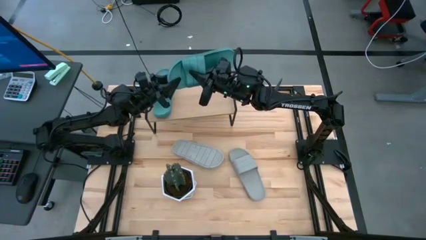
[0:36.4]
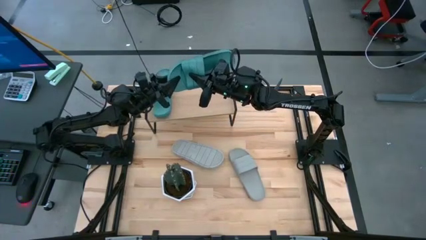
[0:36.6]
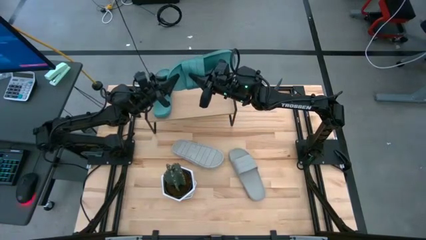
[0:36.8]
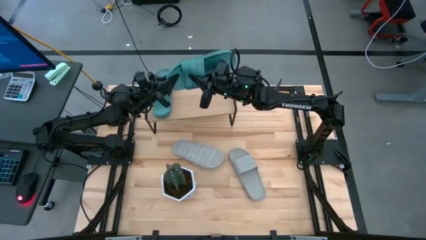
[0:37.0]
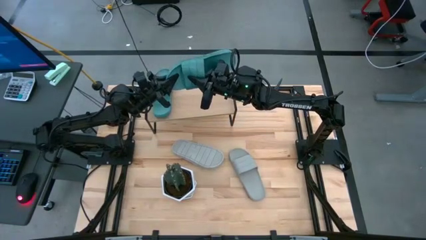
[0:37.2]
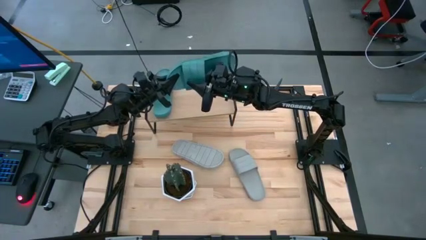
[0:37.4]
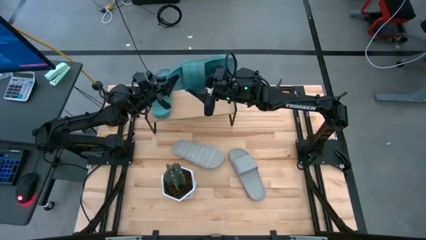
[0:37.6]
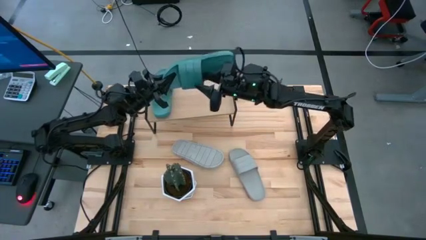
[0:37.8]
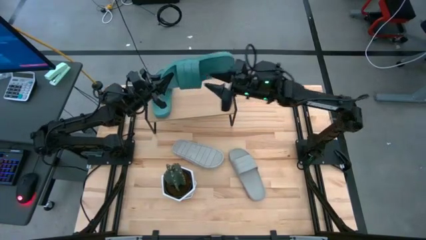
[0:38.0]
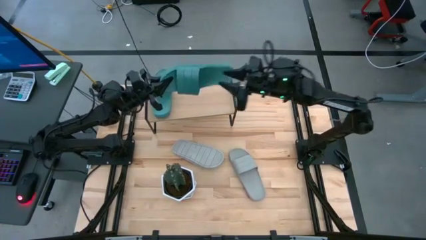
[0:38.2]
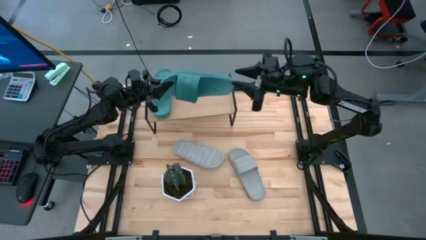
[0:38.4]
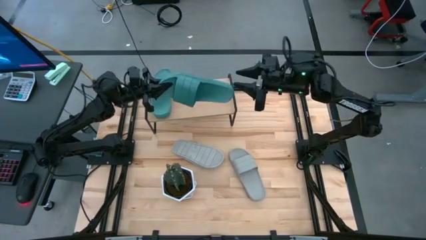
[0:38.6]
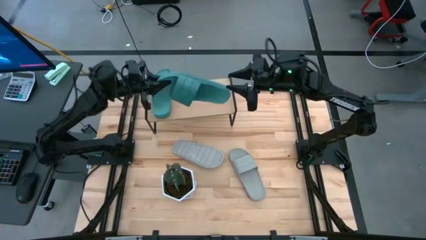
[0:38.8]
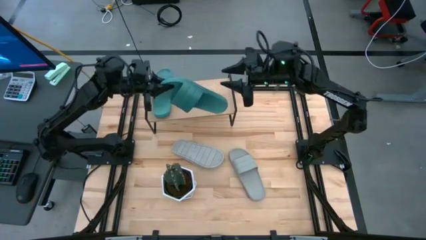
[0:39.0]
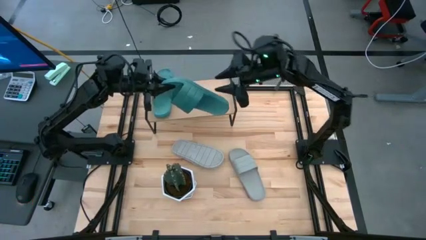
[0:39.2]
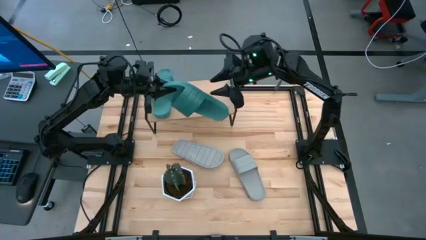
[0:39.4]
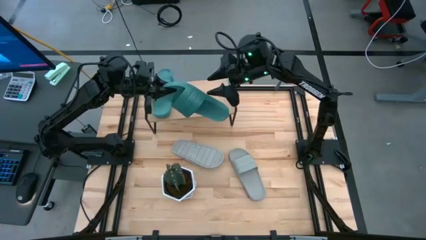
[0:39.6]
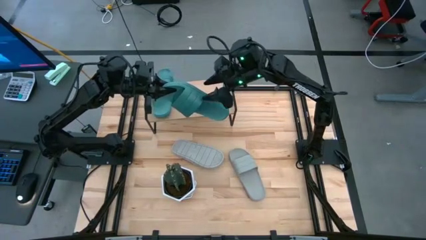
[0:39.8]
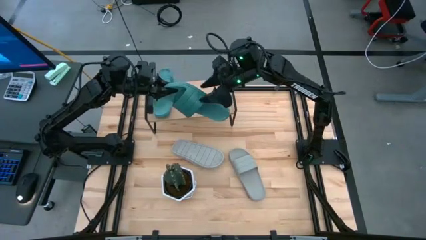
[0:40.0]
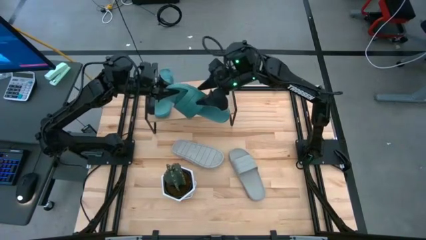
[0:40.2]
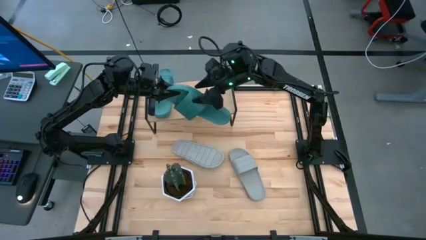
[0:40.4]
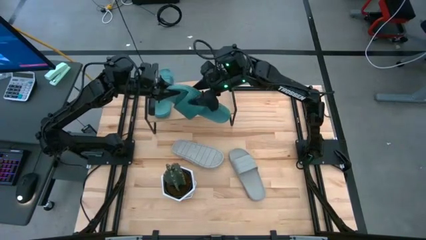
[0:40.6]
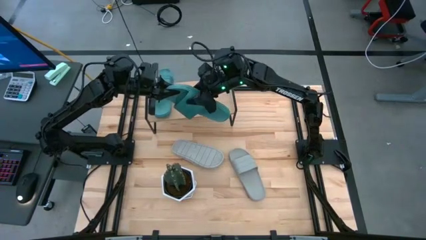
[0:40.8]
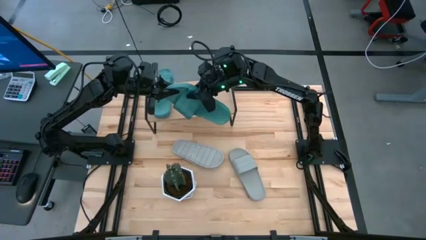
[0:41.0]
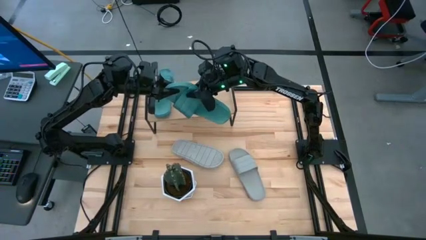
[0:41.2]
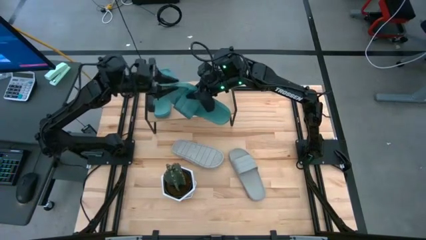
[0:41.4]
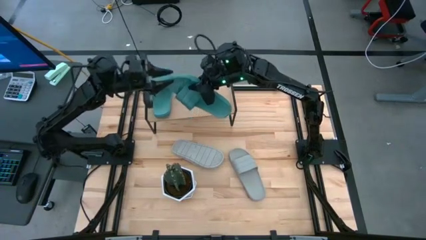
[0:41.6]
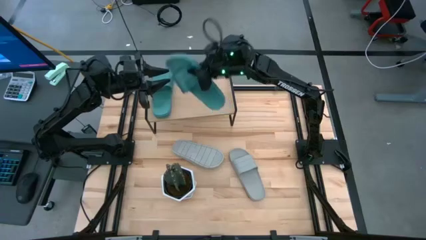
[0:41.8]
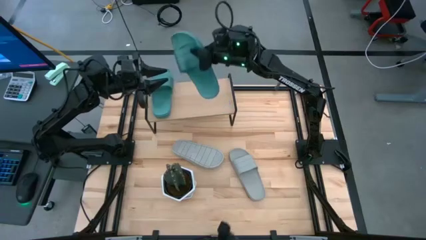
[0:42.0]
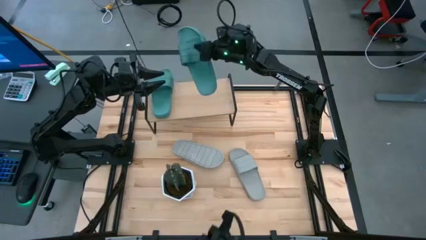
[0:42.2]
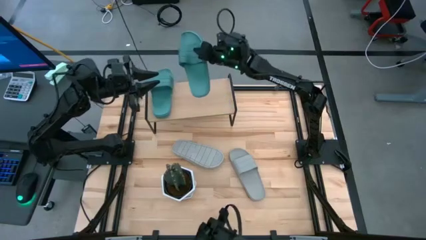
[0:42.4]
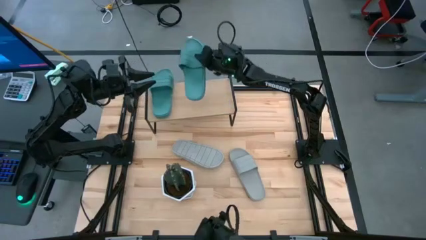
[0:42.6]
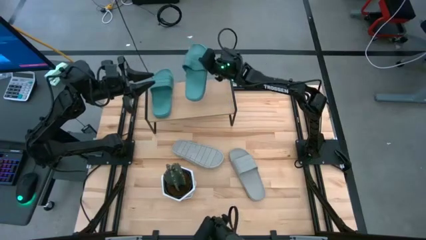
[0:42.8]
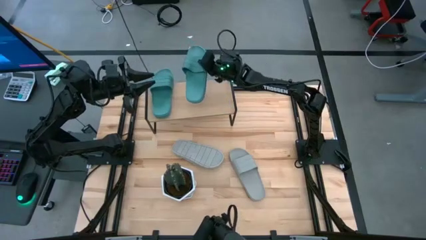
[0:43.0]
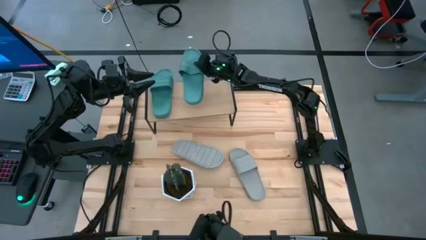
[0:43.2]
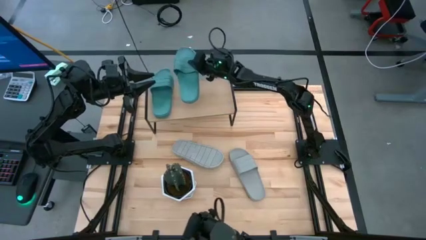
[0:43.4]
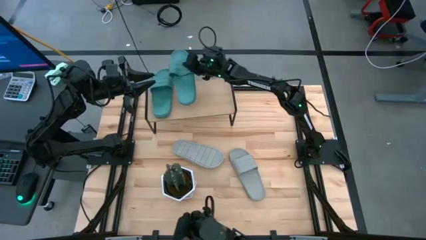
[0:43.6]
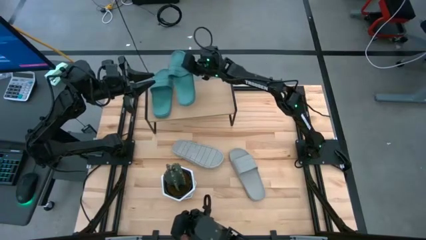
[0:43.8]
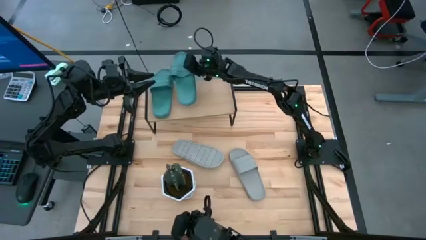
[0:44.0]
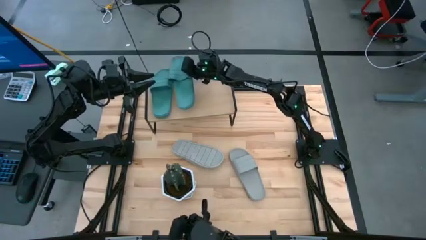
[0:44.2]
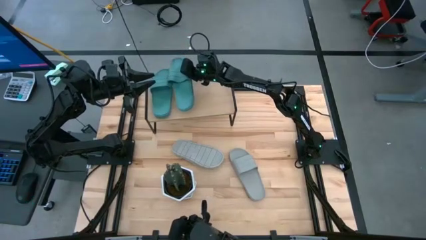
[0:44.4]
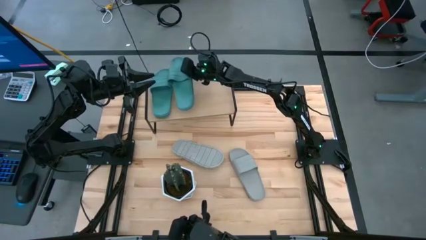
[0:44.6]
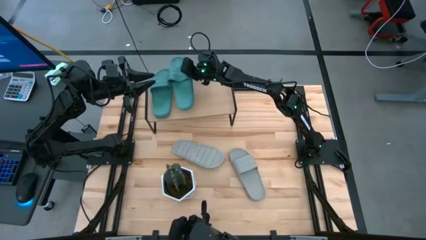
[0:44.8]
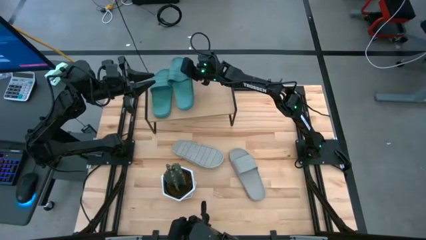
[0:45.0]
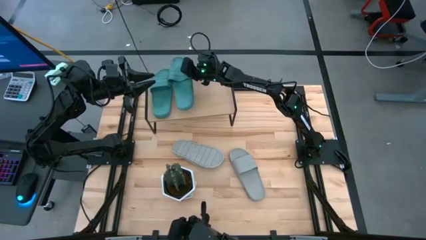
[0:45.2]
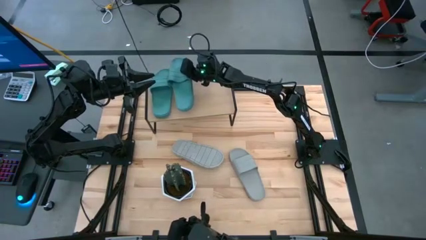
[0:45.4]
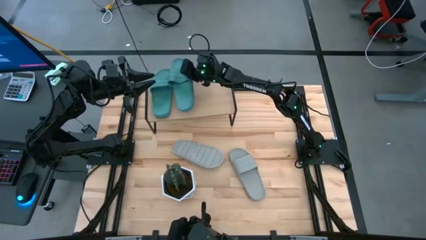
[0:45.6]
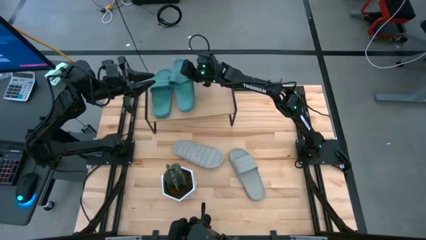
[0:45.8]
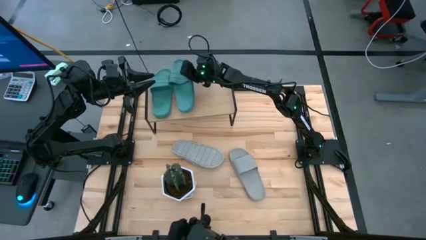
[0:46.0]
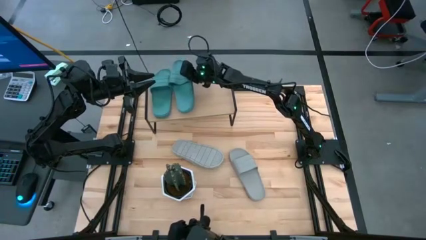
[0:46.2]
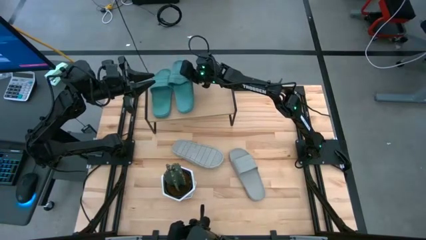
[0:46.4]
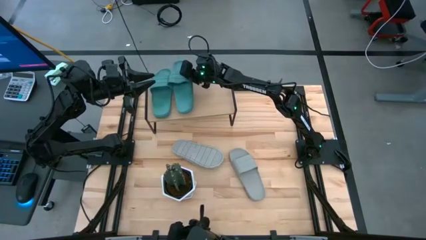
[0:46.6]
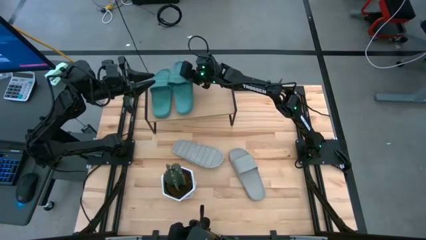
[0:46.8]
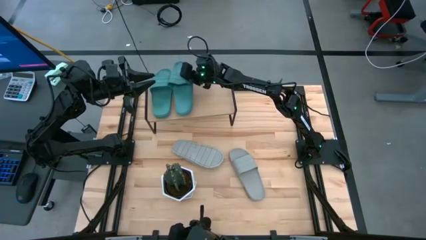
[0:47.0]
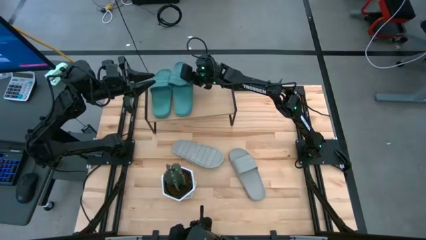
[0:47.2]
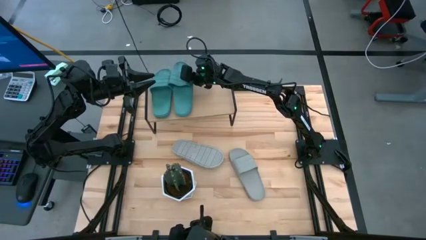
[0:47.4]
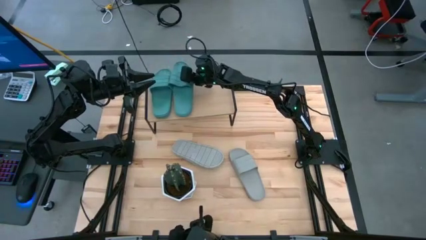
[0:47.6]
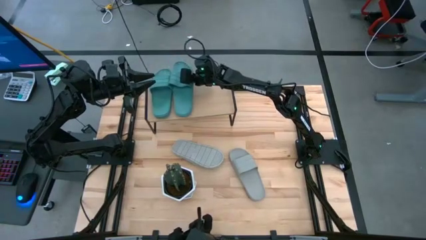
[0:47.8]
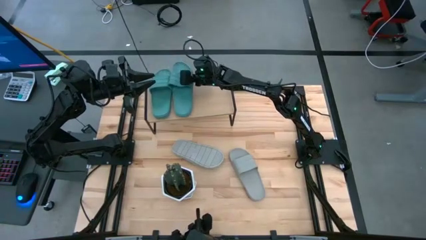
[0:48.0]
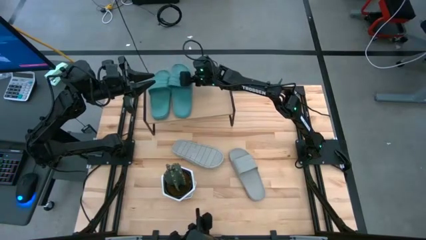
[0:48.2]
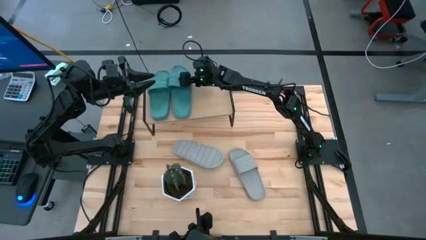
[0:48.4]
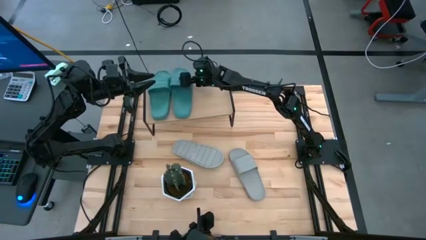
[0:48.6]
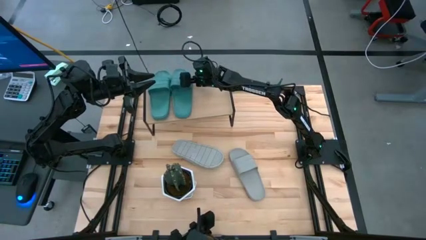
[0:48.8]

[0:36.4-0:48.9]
Task: Pick and place slides into the shelf
Put the green slipper on the shelf
